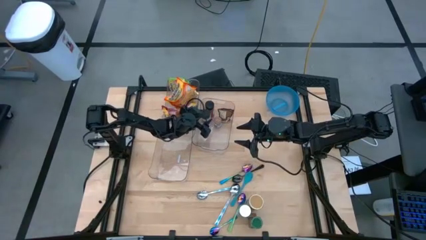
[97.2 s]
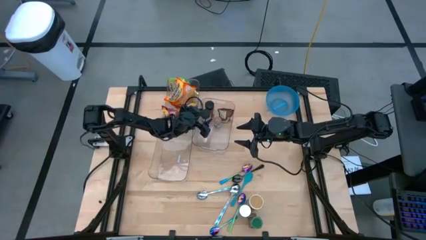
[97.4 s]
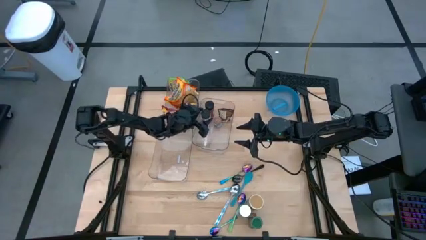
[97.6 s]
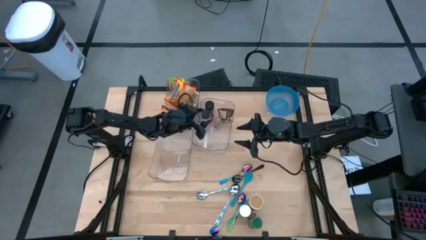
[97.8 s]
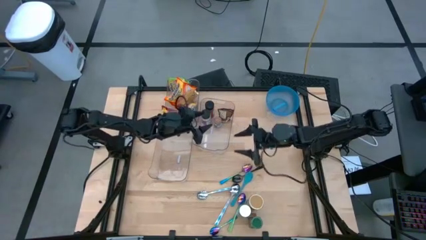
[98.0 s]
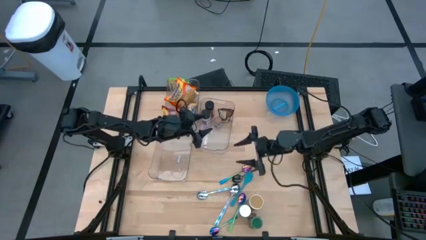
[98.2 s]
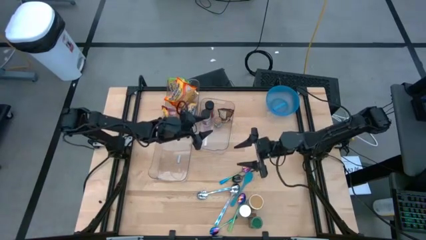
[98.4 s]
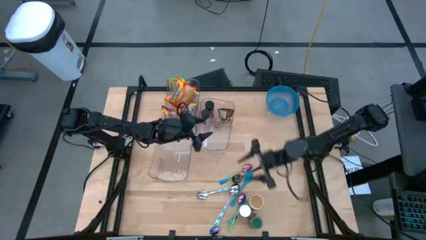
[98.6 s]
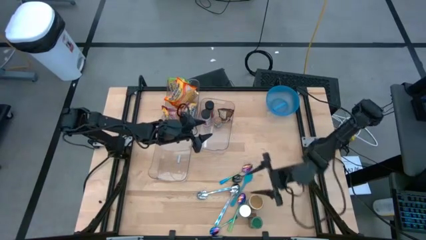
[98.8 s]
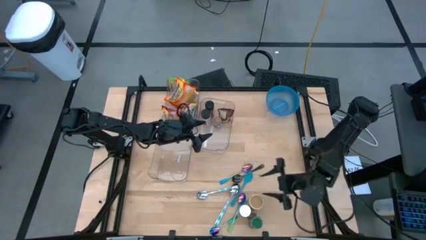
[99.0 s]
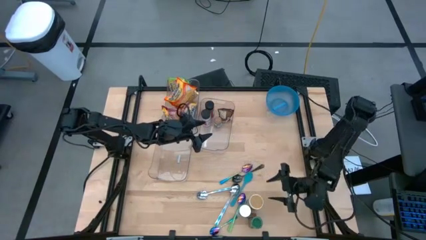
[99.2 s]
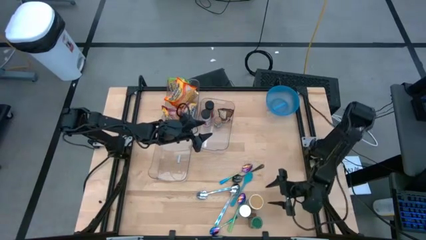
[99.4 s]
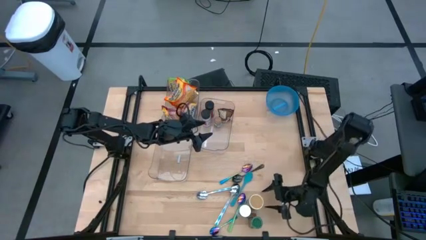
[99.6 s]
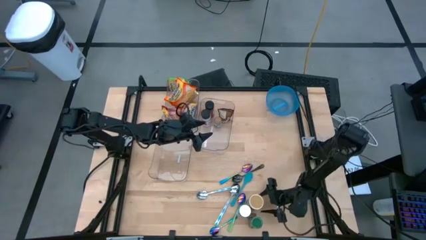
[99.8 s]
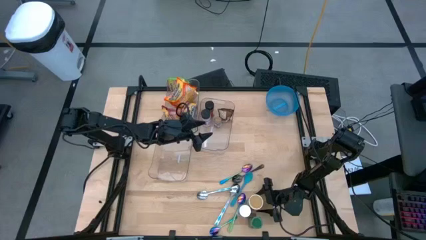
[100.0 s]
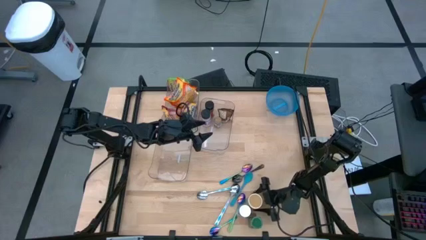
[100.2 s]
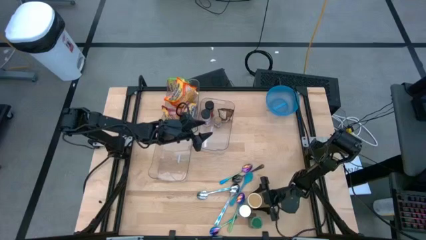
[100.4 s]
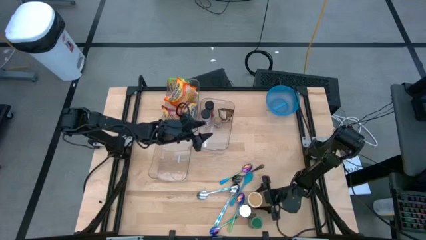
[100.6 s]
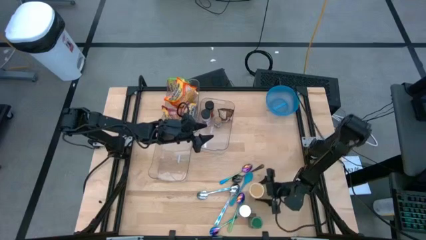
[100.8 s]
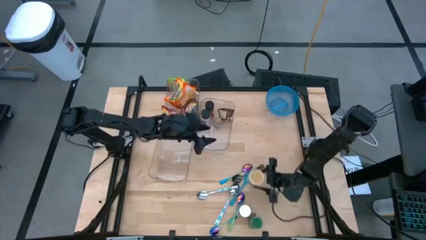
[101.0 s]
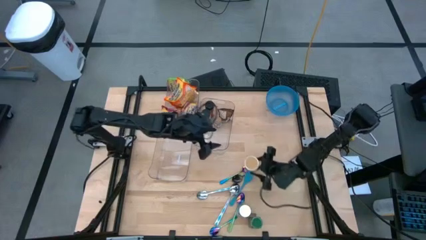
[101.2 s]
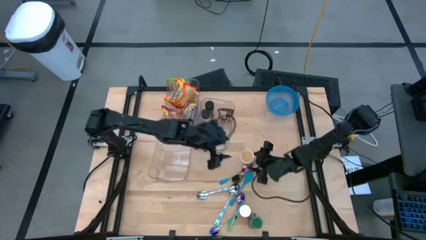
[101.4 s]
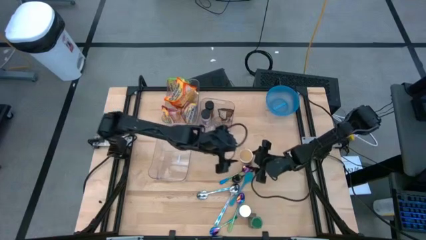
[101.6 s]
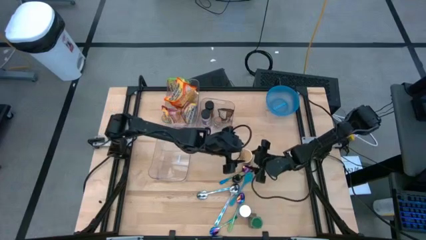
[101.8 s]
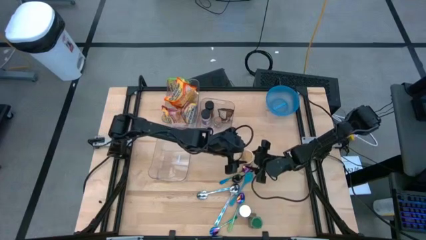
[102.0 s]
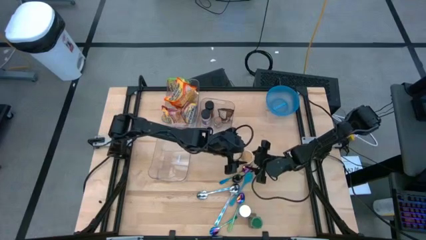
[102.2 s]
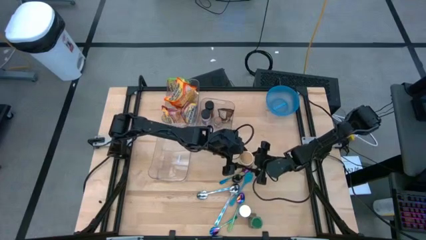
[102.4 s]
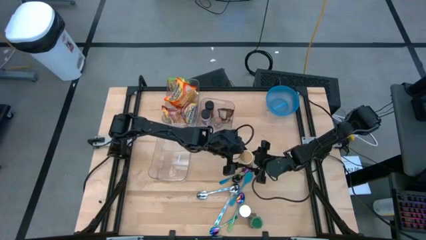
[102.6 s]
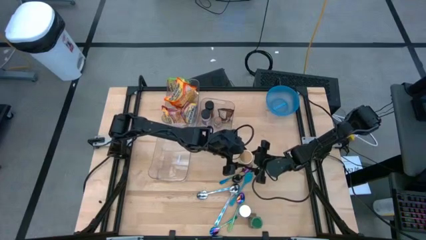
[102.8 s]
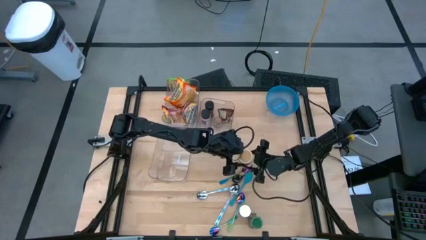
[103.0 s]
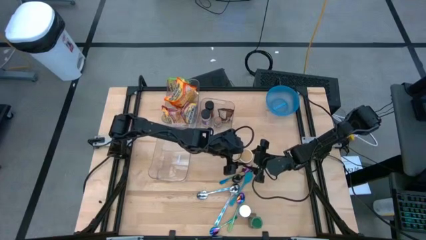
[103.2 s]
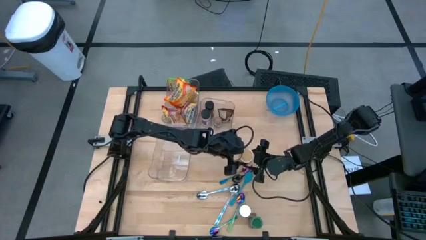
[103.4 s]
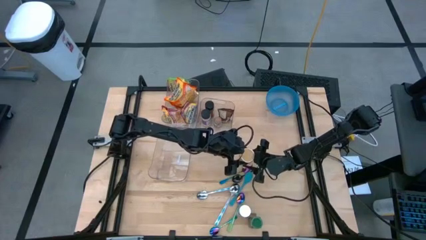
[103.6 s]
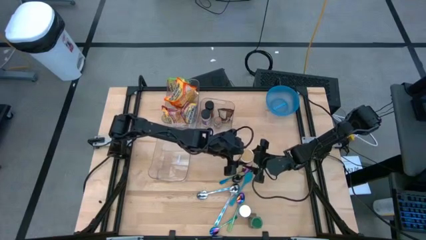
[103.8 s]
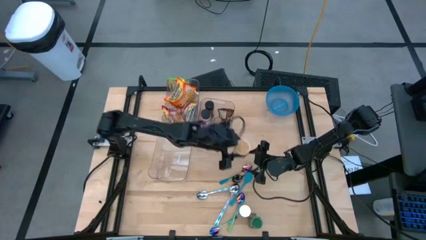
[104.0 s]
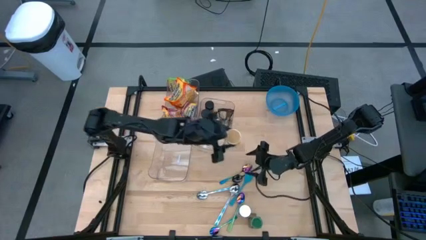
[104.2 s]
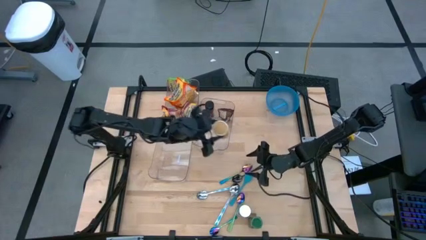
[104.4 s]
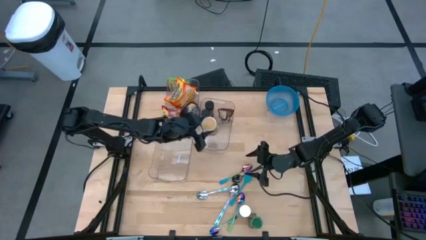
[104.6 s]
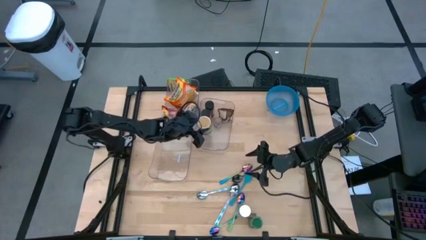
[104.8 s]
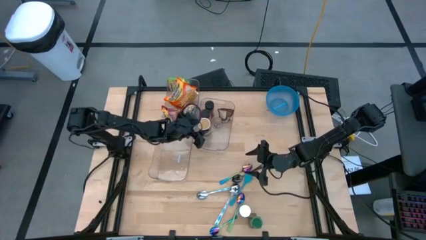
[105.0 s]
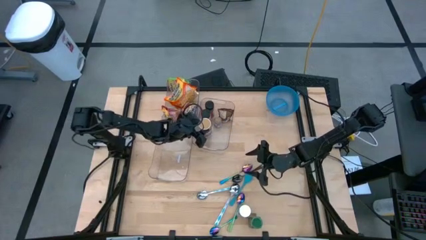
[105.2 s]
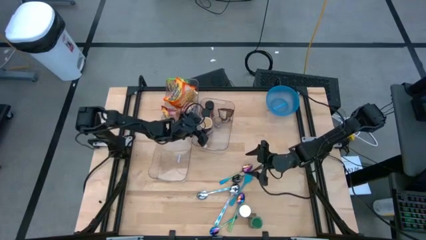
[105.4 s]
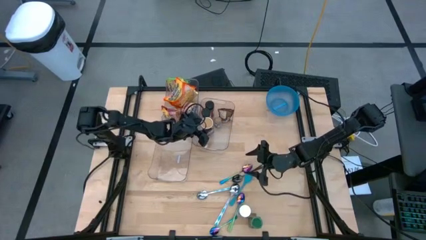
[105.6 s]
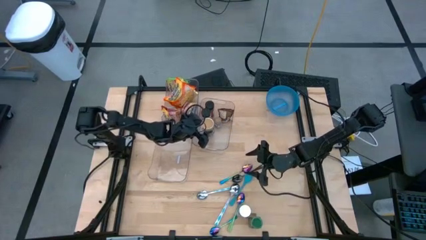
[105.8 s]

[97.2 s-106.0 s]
Task: Pick & Place Food Item
Put the gold spice bottle into the middle transparent bin

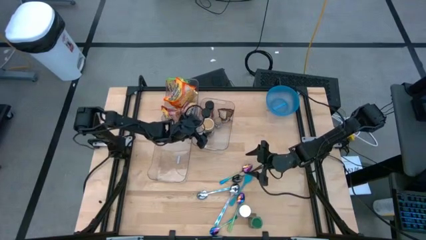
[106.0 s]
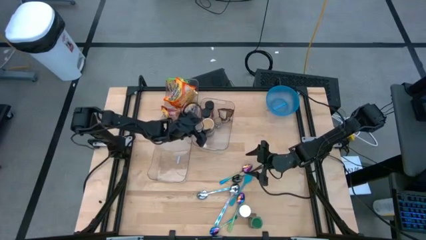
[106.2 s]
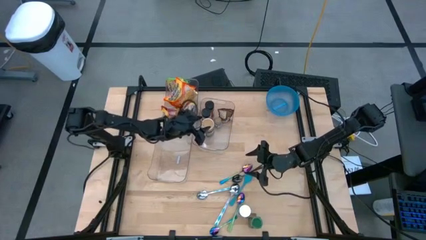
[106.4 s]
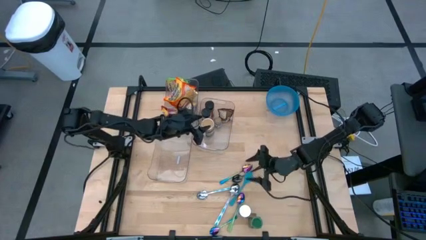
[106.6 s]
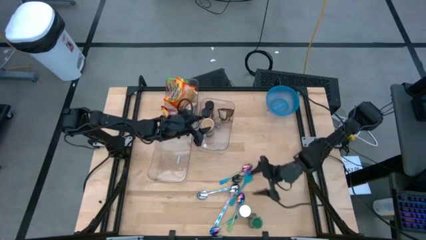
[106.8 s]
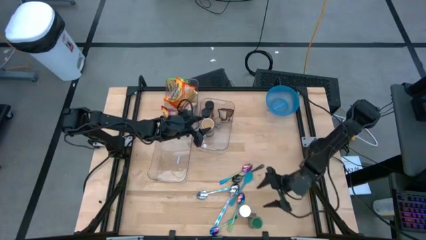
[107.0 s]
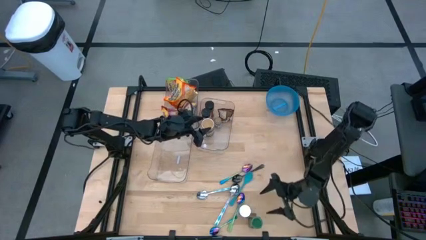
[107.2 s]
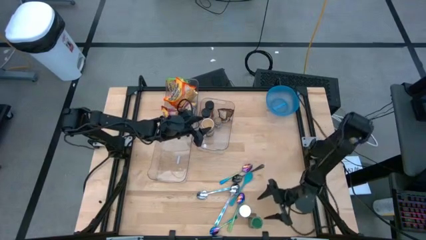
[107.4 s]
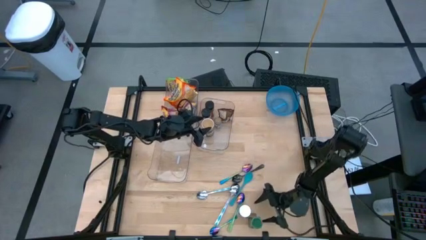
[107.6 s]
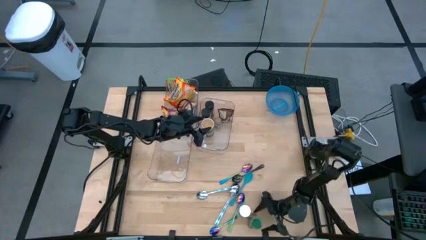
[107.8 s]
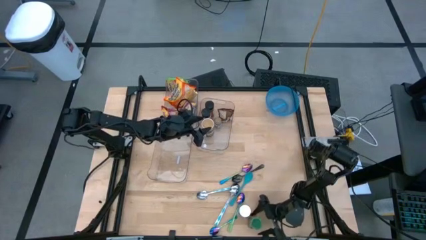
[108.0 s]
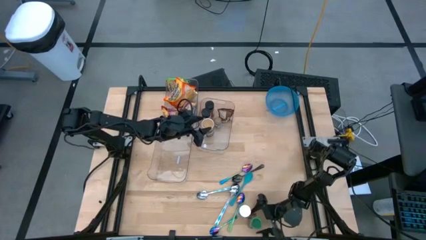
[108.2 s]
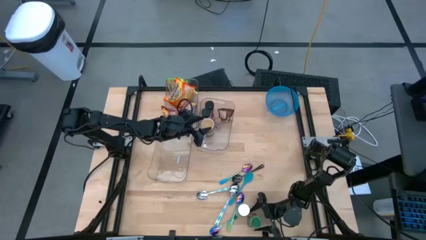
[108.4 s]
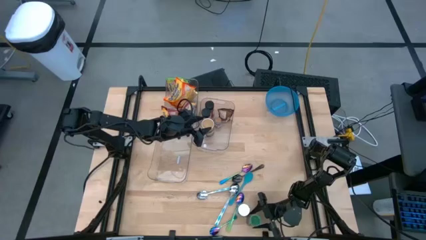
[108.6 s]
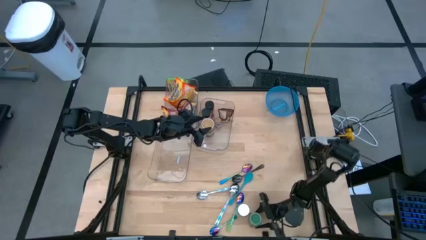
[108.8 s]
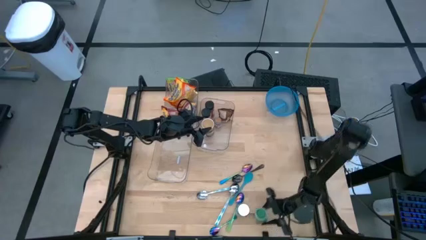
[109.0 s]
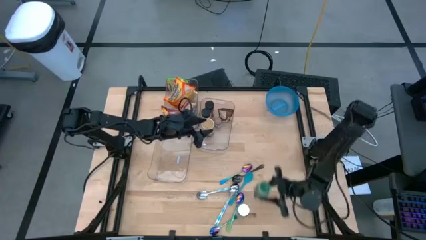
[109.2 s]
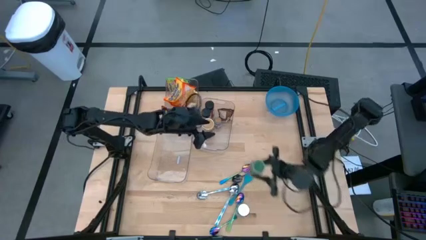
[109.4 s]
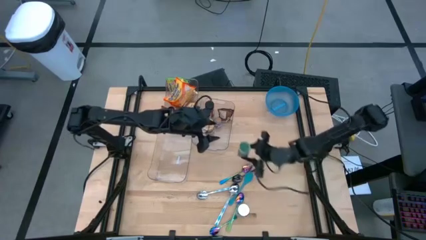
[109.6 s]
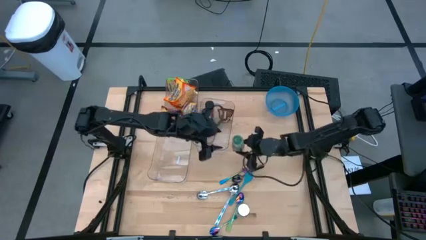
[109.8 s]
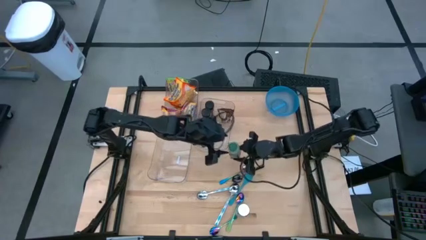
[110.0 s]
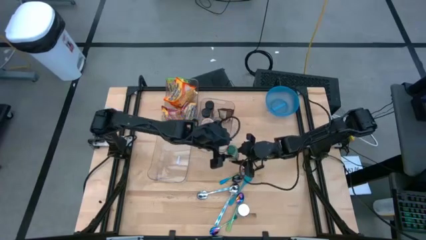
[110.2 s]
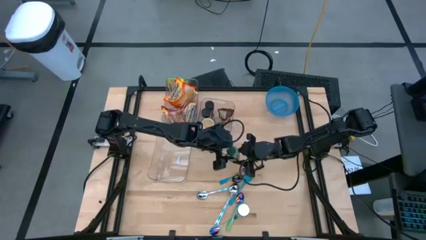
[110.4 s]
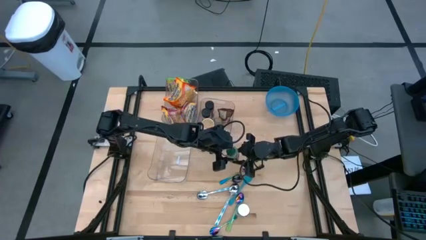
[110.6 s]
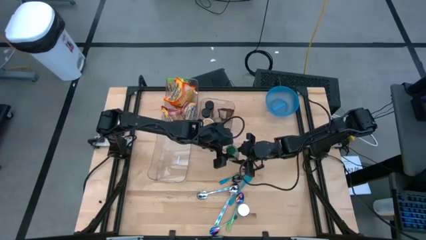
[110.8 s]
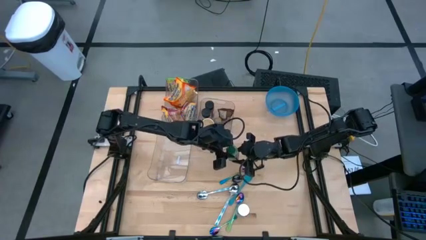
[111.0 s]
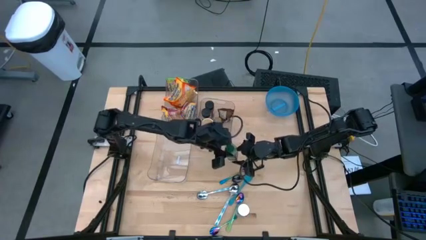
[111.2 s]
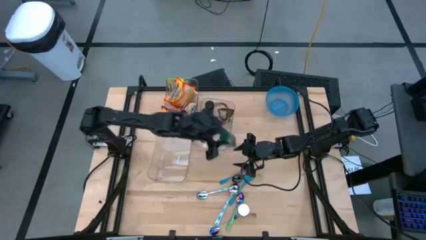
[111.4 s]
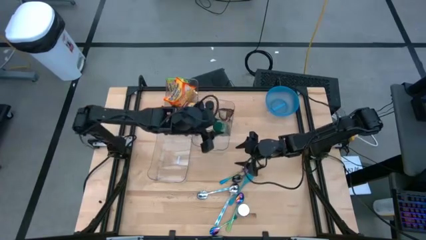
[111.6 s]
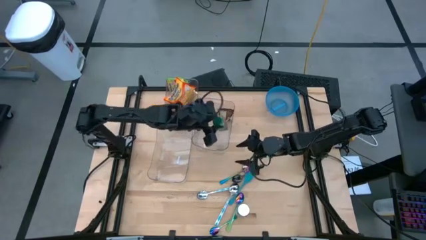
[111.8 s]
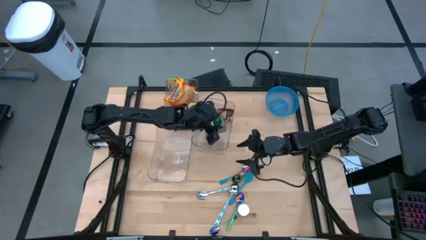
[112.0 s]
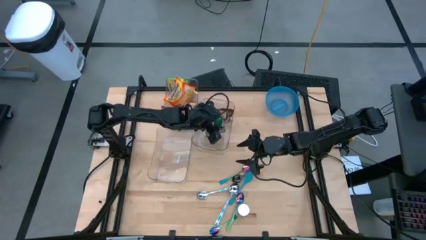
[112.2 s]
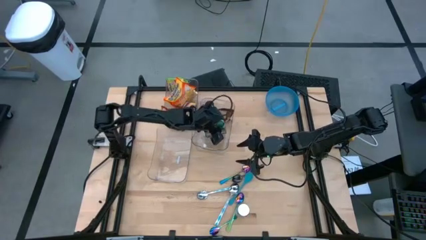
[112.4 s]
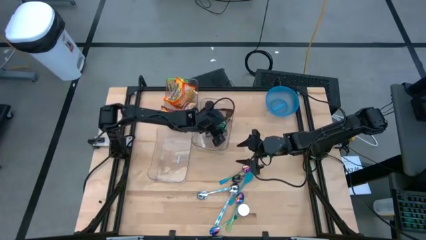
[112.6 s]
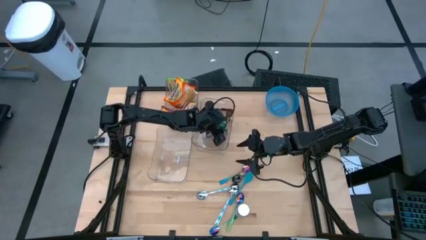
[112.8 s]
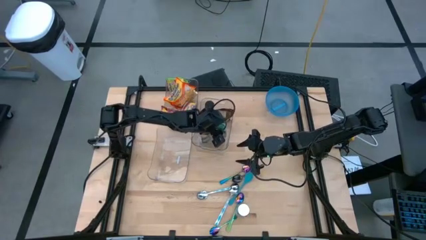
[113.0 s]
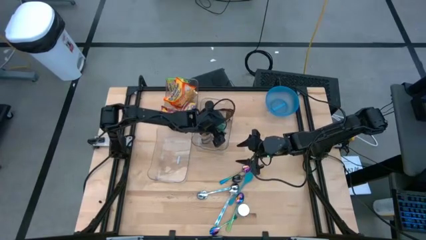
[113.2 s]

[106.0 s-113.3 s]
Put the green spice bottle into the middle transparent bin
